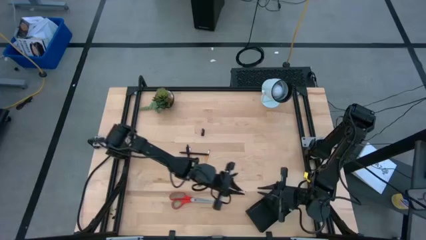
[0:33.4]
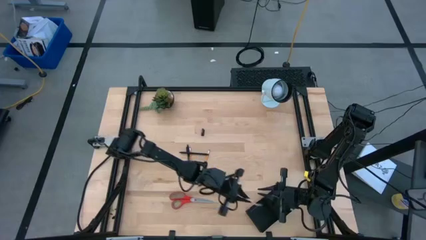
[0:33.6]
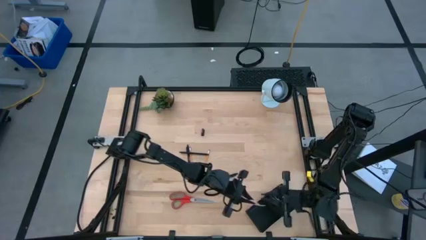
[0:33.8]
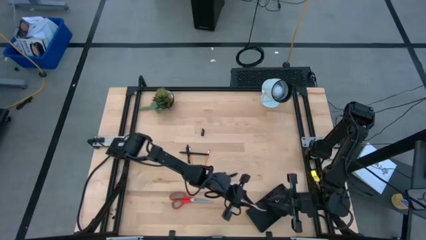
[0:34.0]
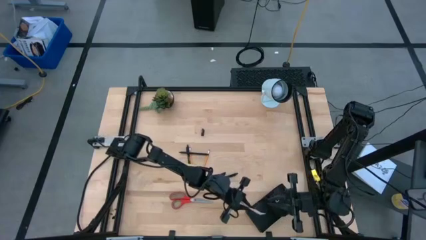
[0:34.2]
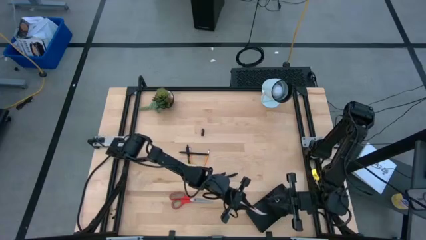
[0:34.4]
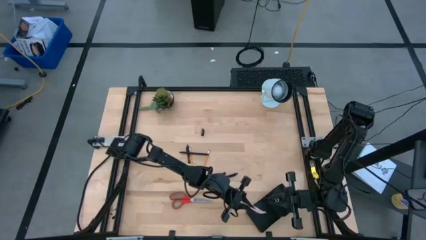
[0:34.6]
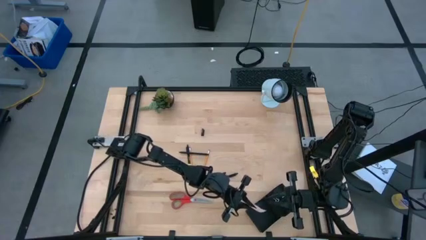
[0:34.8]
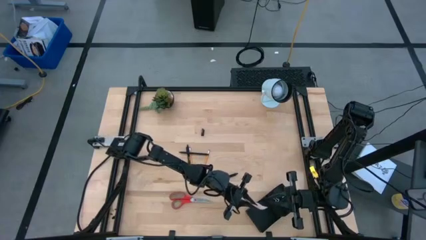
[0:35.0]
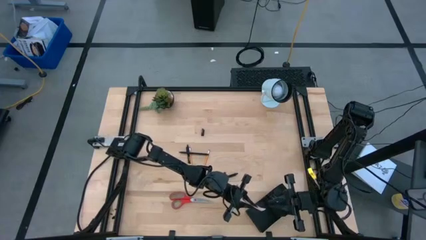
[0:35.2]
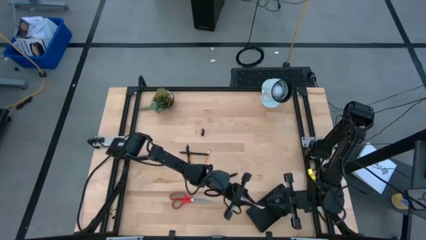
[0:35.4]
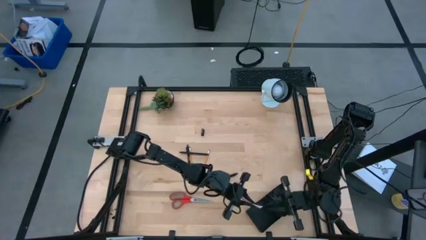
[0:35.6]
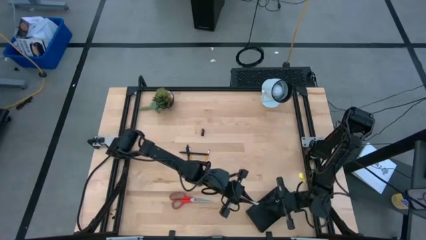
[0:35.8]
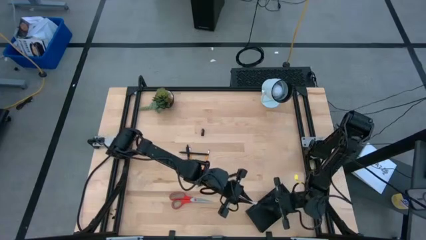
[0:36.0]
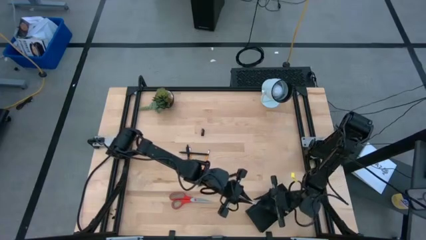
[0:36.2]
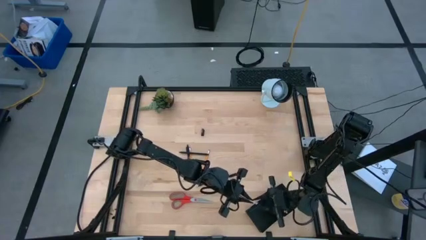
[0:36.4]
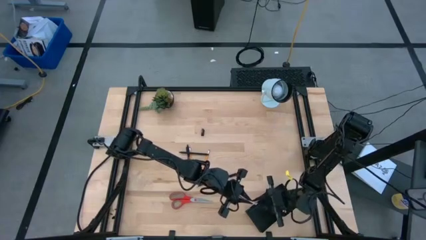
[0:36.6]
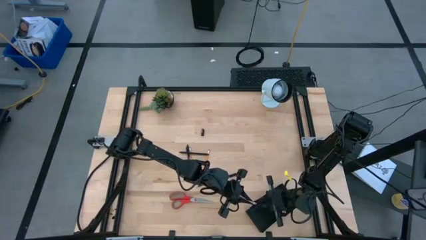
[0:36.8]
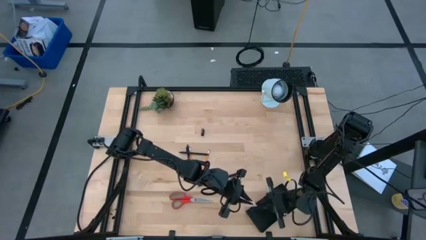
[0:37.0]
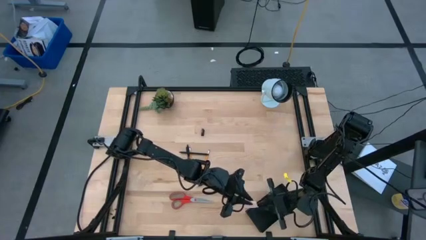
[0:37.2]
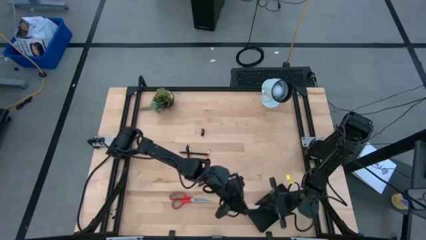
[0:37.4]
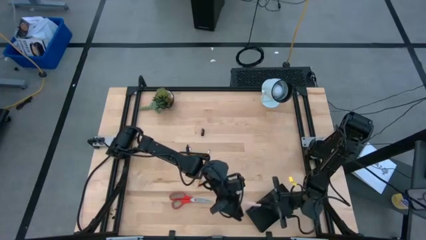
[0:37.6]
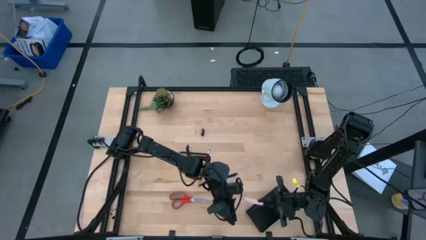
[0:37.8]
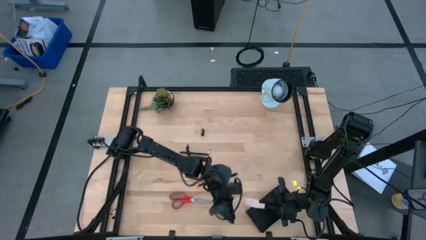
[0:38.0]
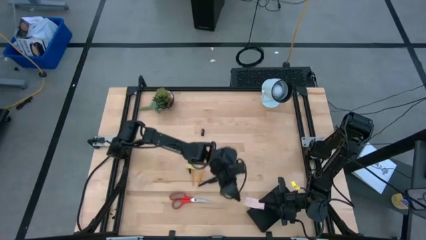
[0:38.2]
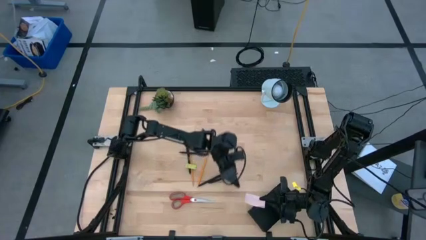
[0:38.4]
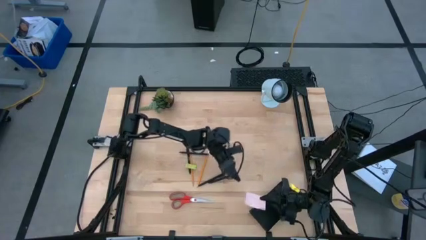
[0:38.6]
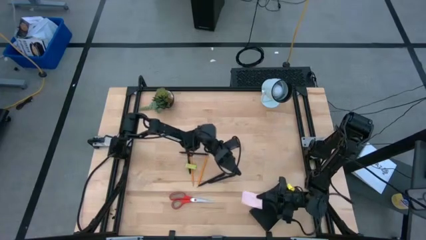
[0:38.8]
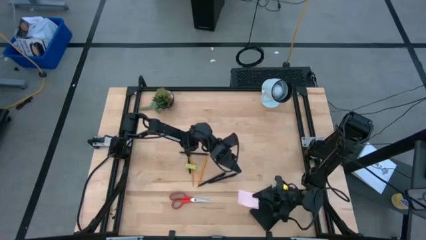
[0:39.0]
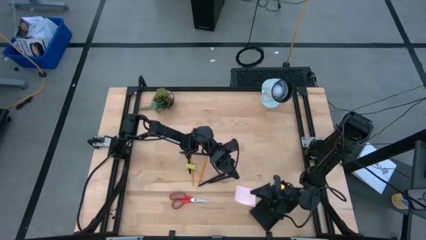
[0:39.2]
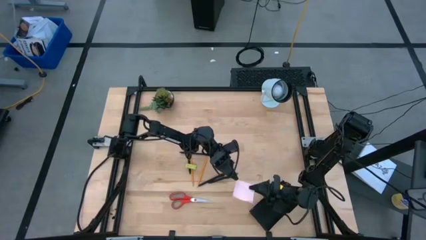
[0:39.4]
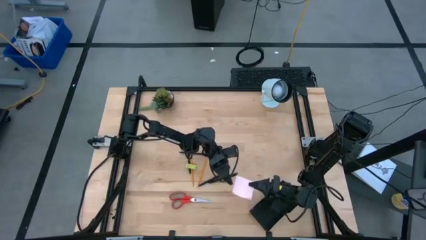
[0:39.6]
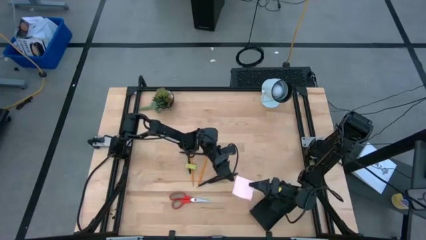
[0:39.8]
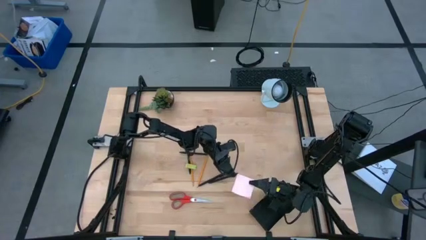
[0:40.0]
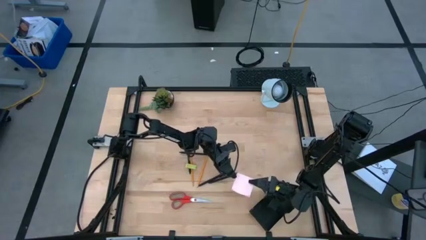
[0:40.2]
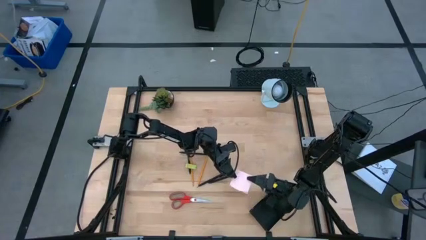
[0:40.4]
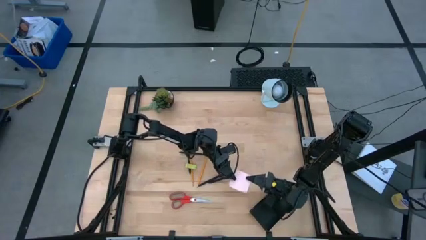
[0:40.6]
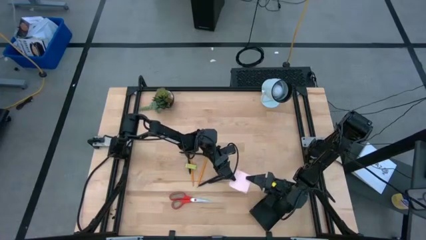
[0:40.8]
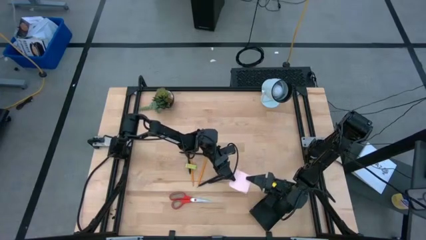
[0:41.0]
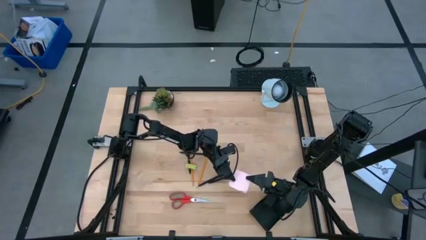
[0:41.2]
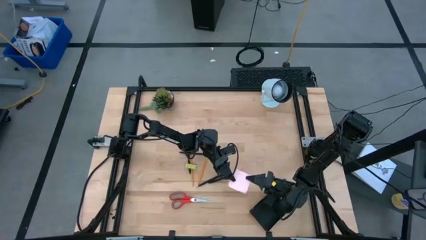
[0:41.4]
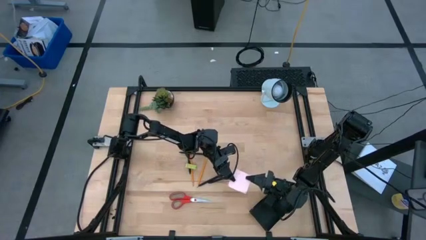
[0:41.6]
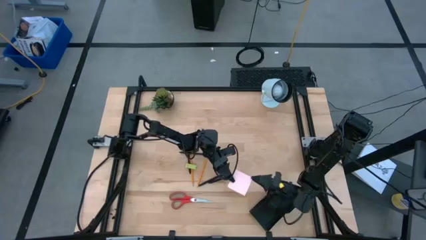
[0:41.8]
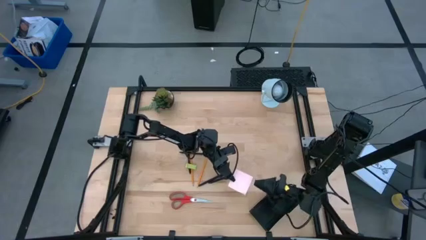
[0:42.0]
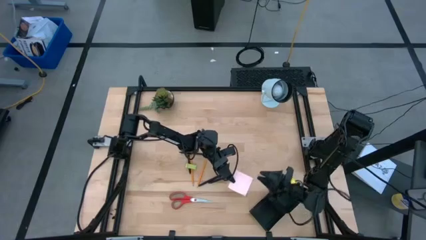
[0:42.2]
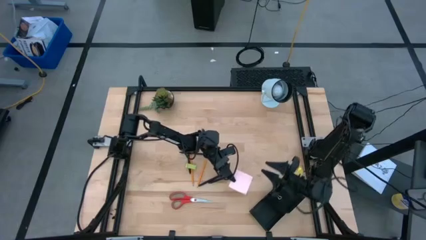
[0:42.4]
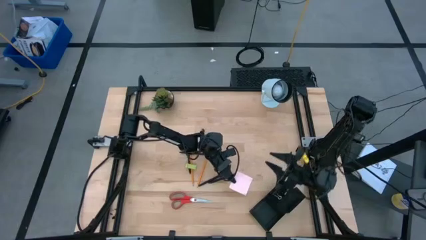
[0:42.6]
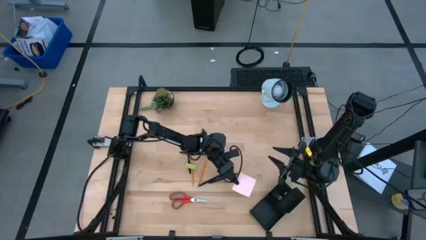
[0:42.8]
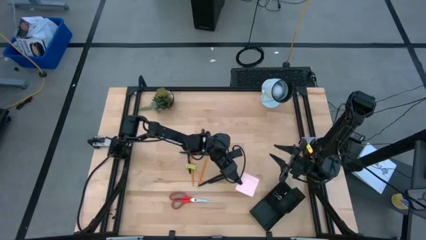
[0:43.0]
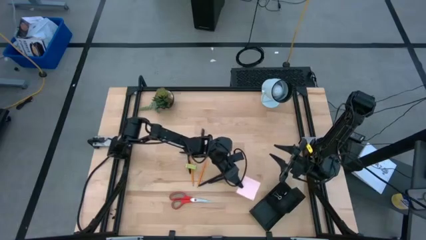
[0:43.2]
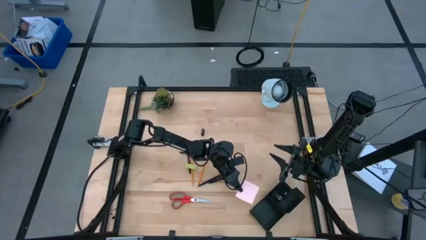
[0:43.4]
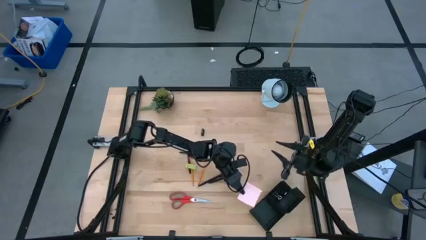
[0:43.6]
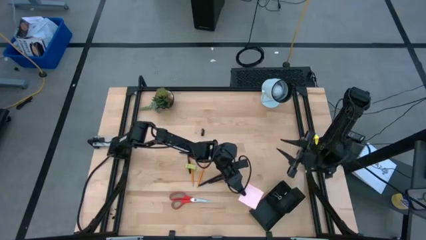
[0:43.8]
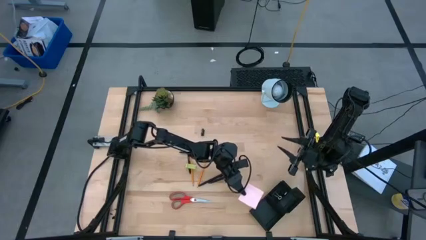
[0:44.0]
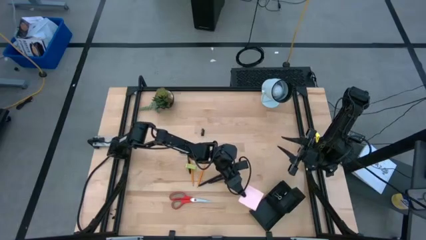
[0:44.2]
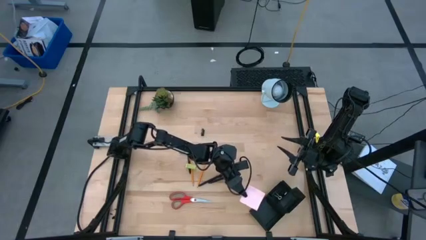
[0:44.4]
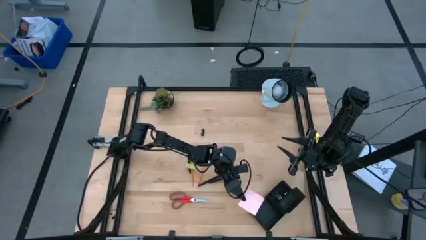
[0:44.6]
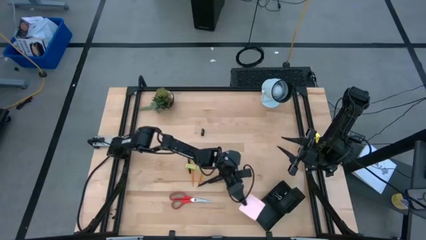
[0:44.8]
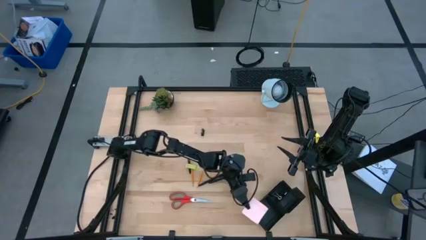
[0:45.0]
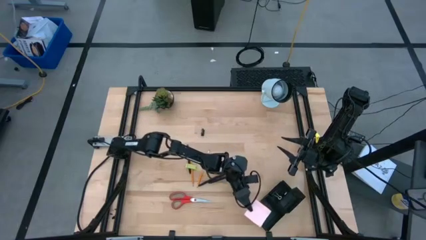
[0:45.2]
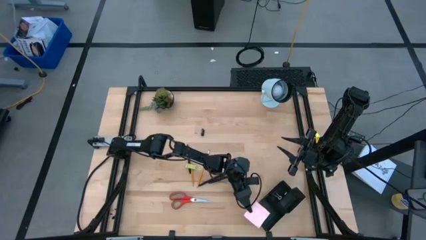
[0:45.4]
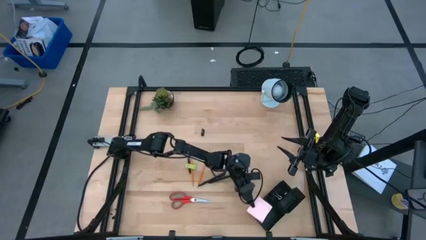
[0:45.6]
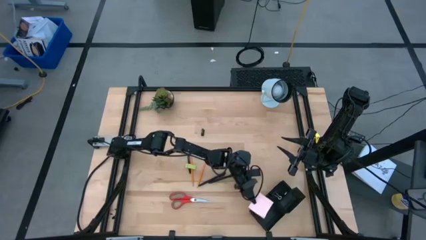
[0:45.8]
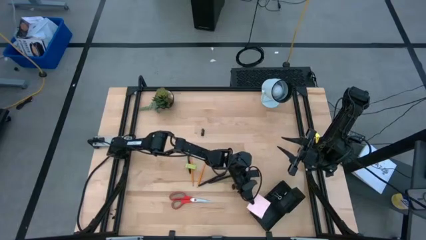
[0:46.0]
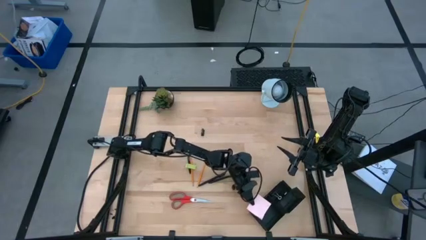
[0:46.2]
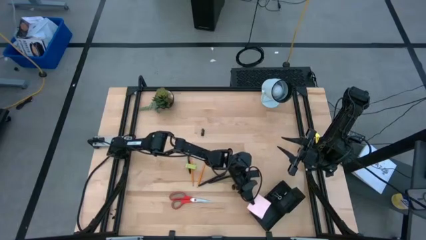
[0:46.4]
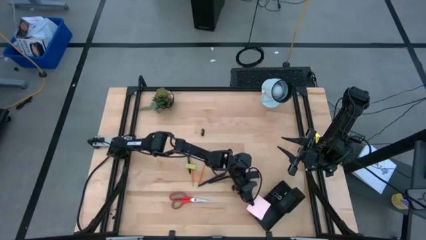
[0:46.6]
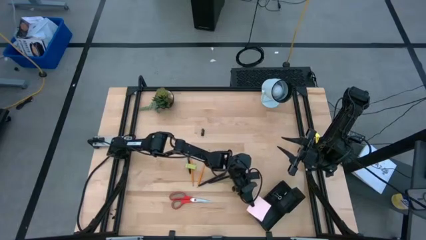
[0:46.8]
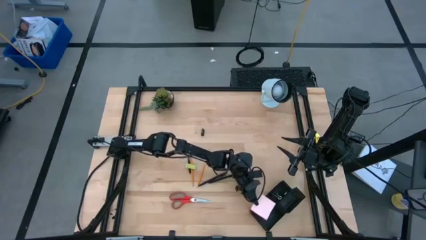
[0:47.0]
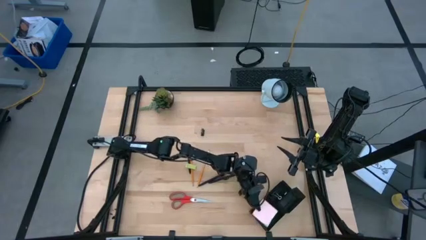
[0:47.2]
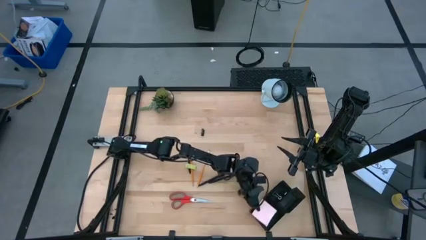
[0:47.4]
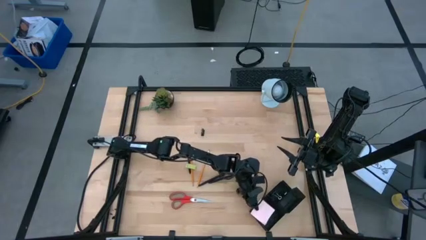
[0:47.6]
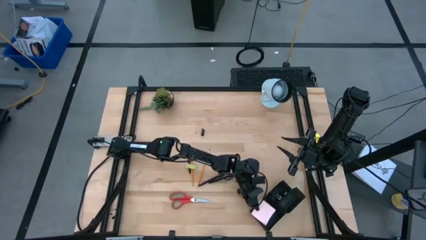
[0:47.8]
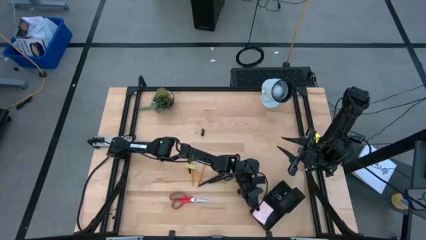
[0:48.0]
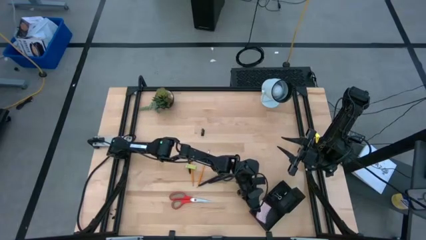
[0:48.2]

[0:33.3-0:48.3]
Task: Pick and place office supplies into organizer
Put the pink sticky note into the desk organizer
